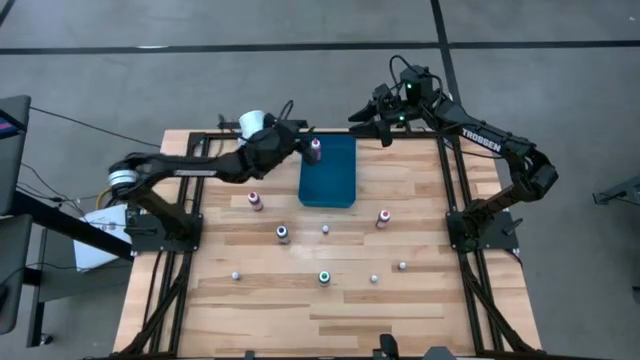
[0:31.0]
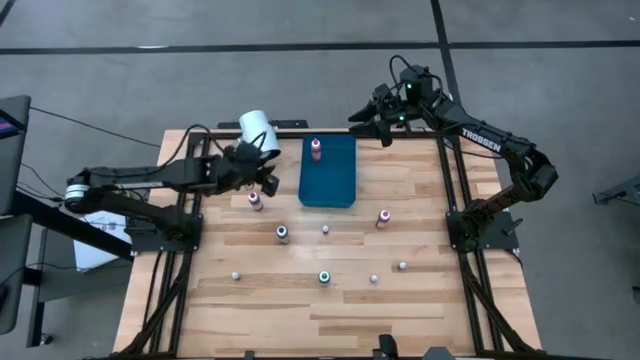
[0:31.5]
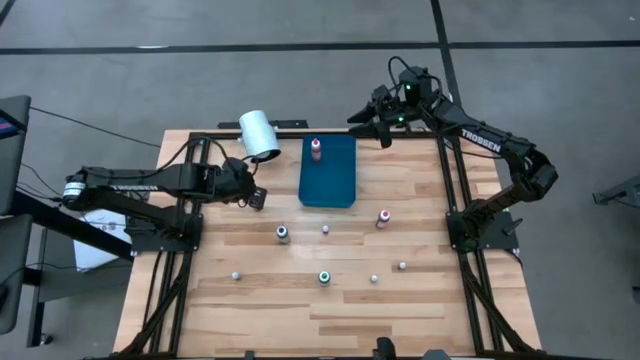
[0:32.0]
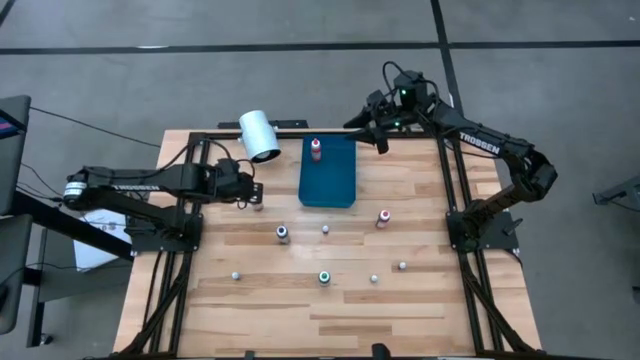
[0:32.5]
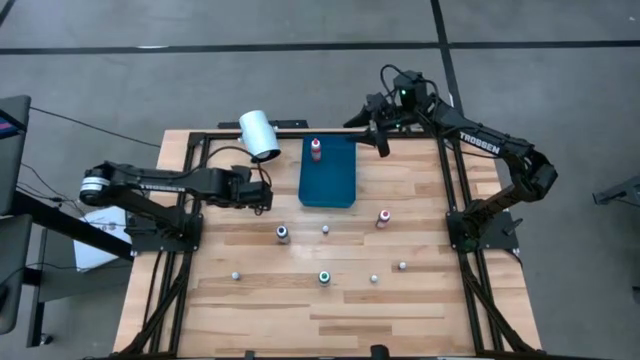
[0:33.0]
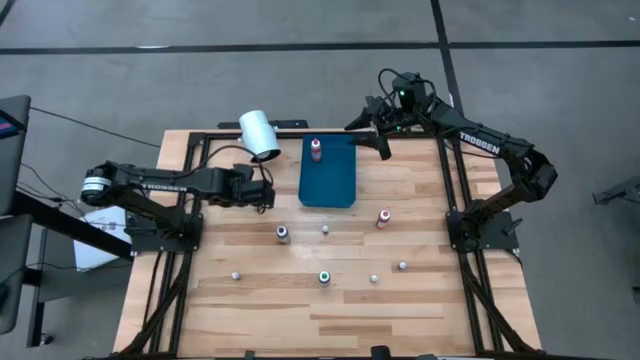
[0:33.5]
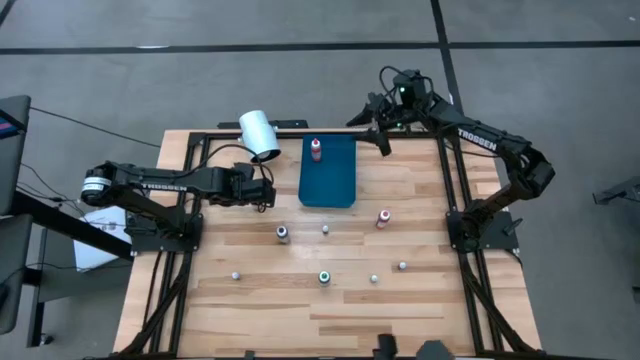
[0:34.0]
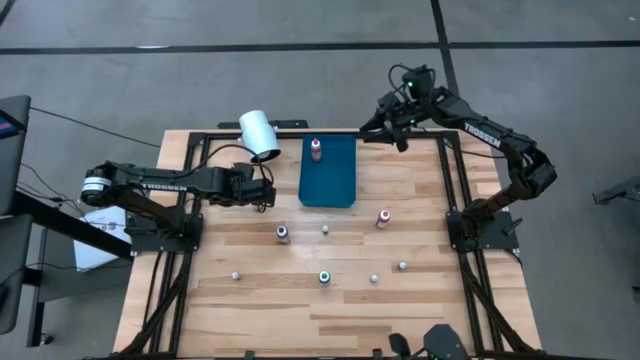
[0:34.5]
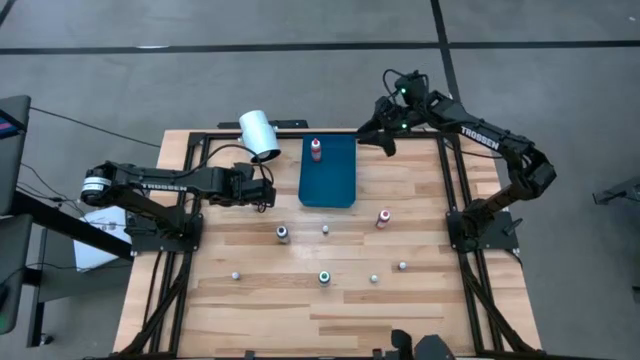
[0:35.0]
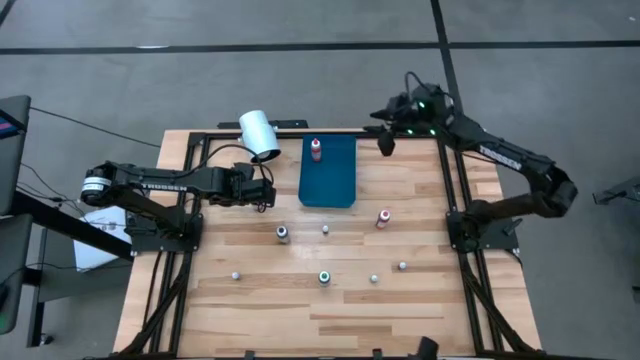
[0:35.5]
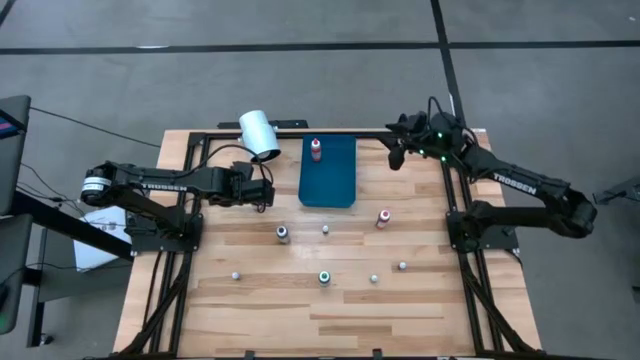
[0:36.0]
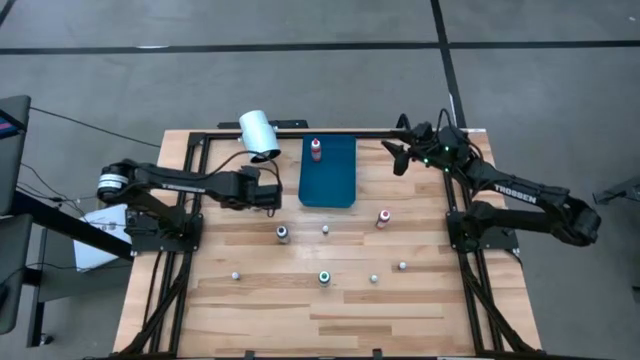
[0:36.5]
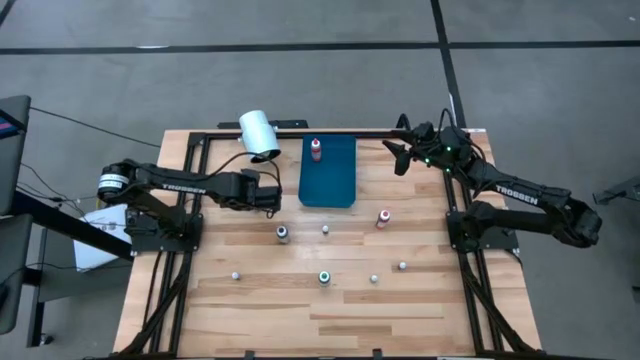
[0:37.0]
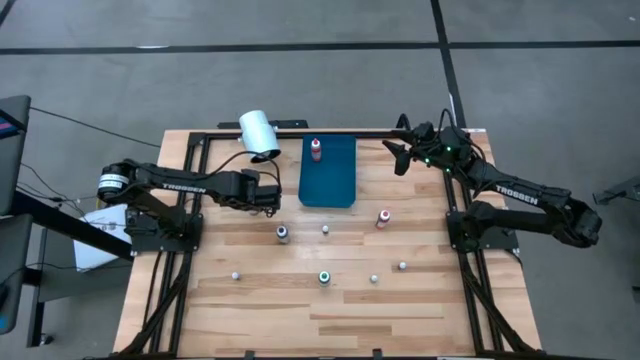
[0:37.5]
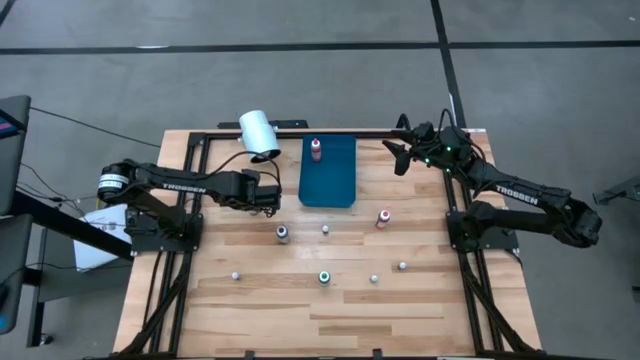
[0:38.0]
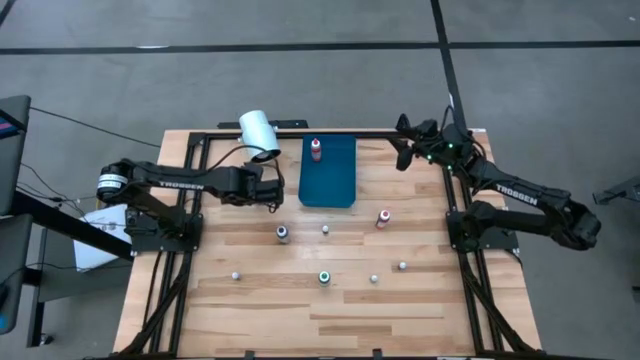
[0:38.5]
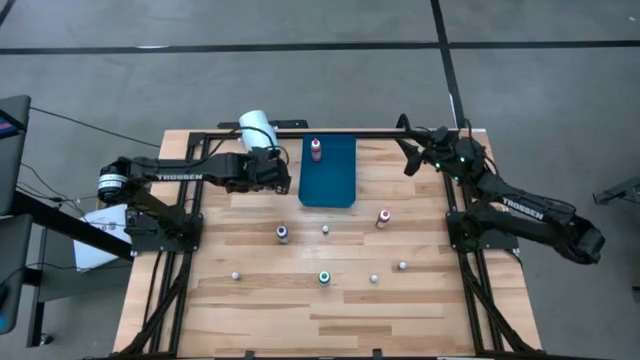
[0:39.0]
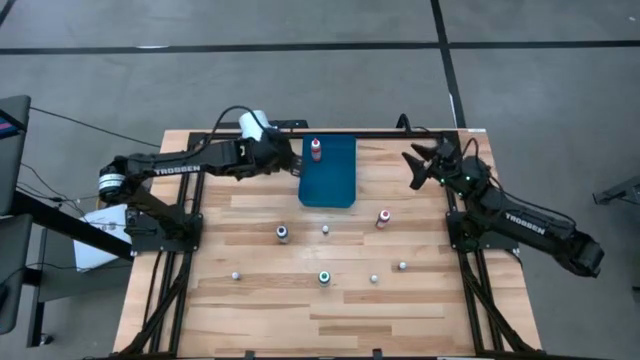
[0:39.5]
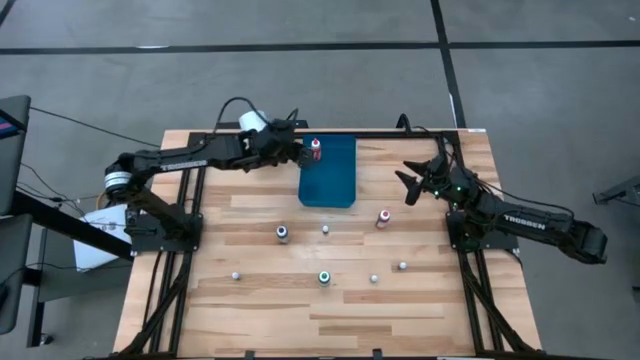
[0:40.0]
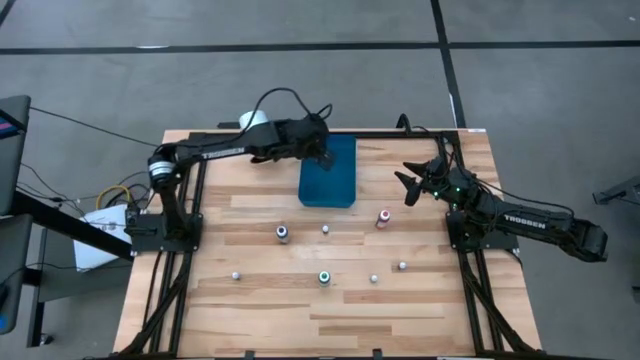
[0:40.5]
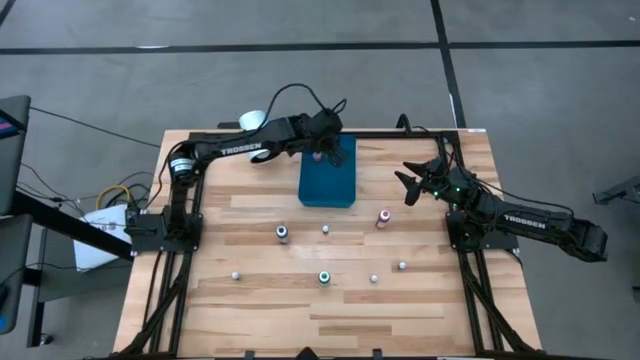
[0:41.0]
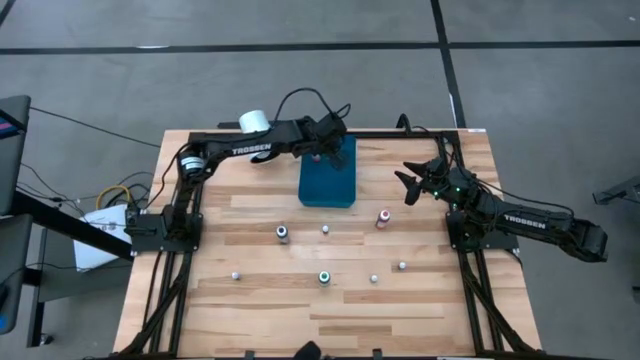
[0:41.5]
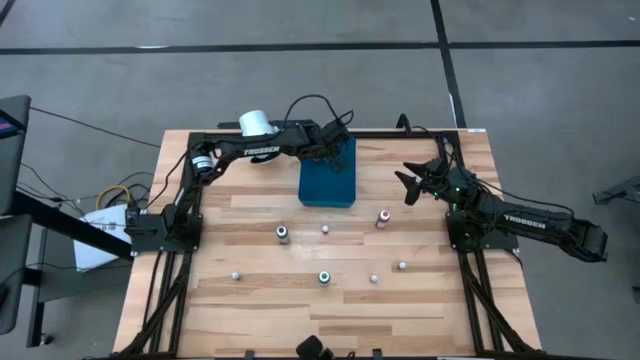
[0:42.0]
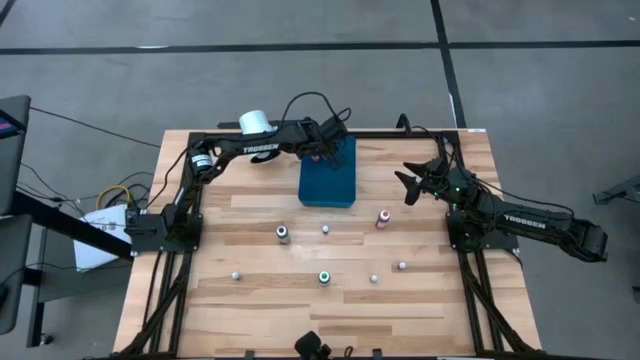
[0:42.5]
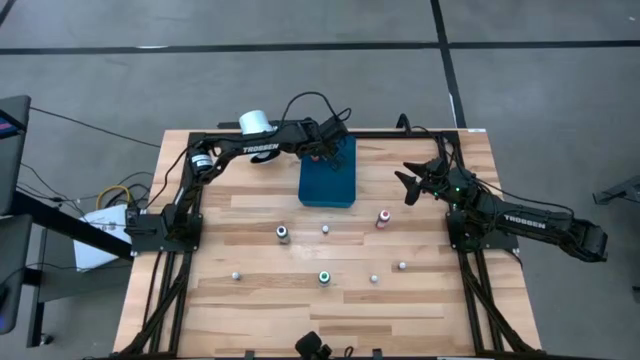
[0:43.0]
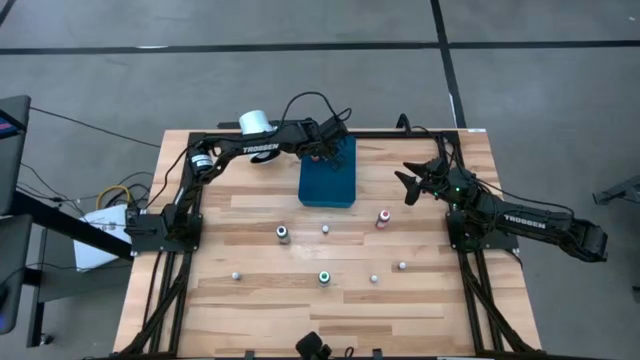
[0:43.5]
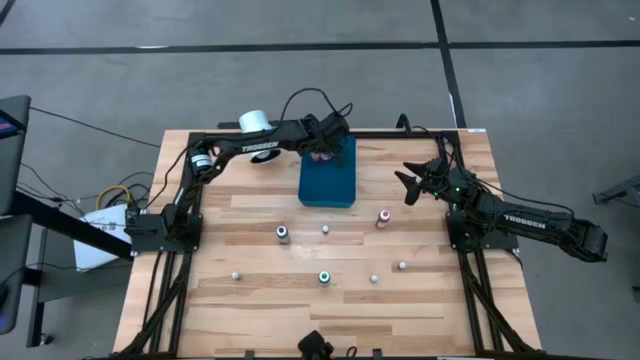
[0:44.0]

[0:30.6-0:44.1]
Task: Pick & Place food coloring
Put the big red food coloring bottle into the blue bin

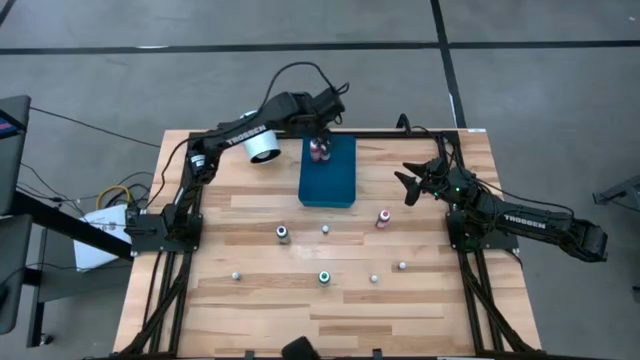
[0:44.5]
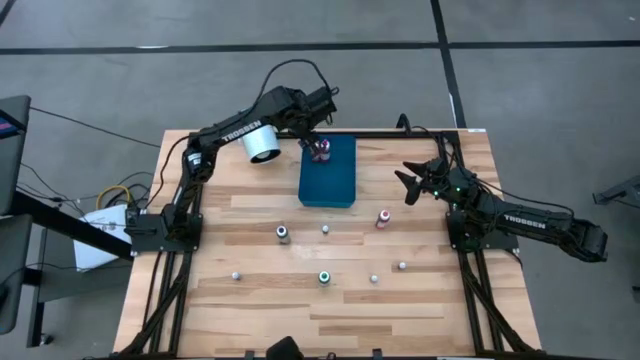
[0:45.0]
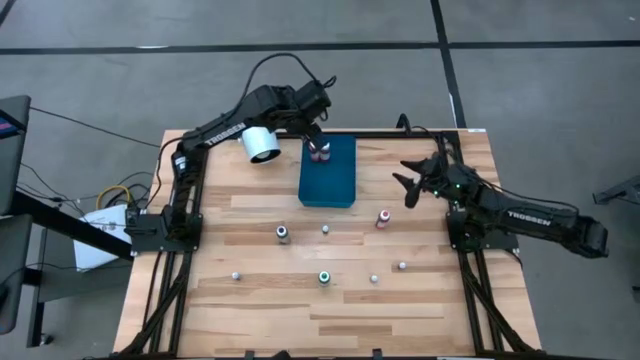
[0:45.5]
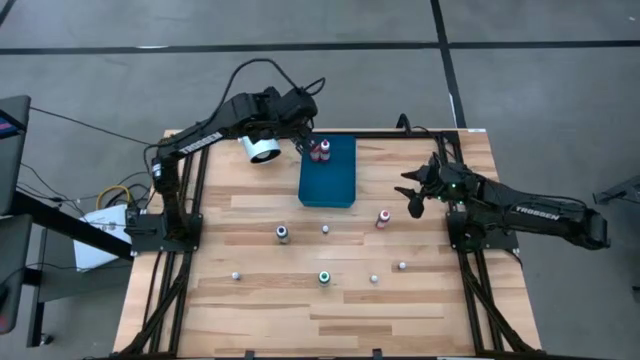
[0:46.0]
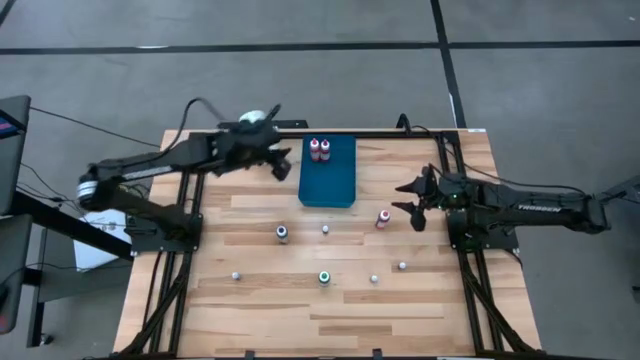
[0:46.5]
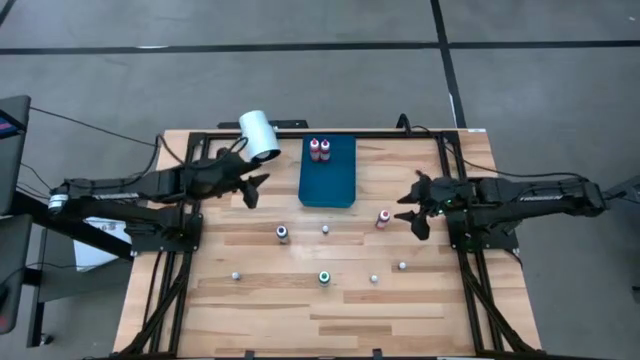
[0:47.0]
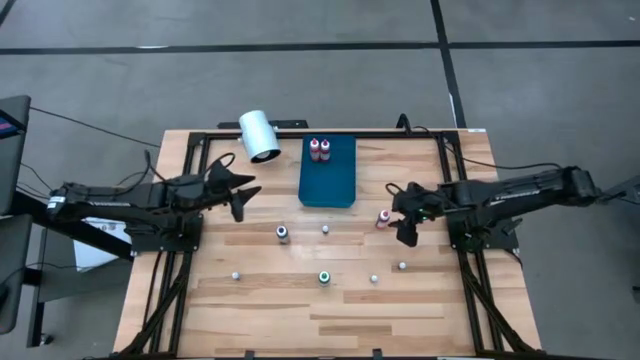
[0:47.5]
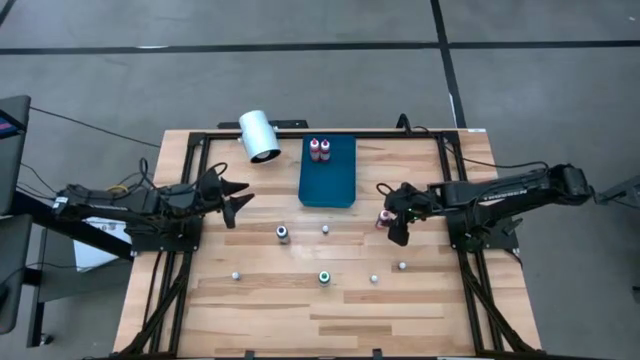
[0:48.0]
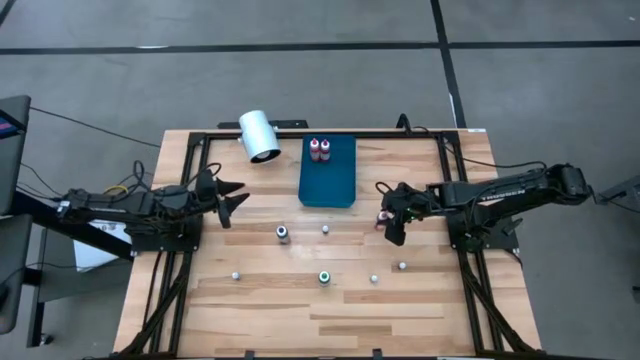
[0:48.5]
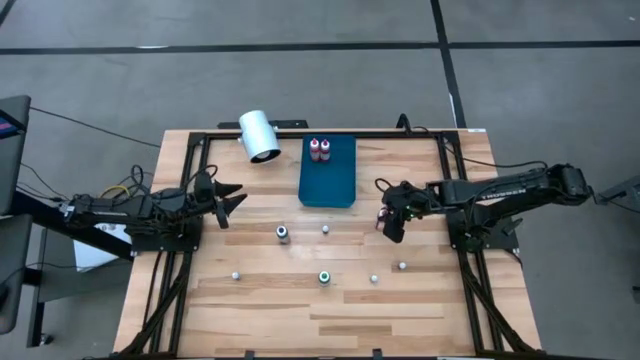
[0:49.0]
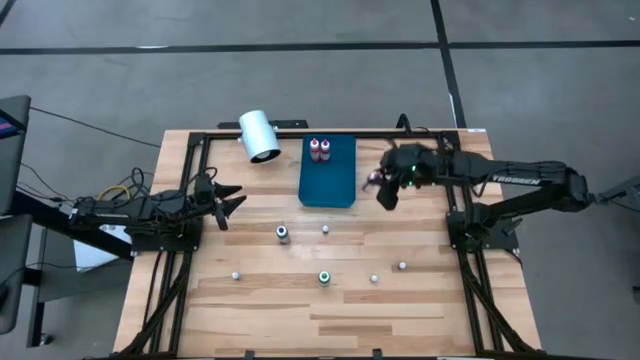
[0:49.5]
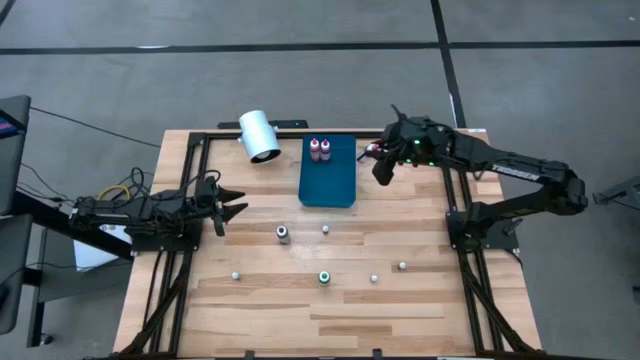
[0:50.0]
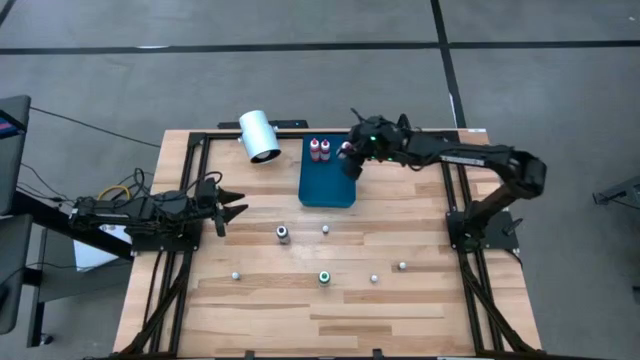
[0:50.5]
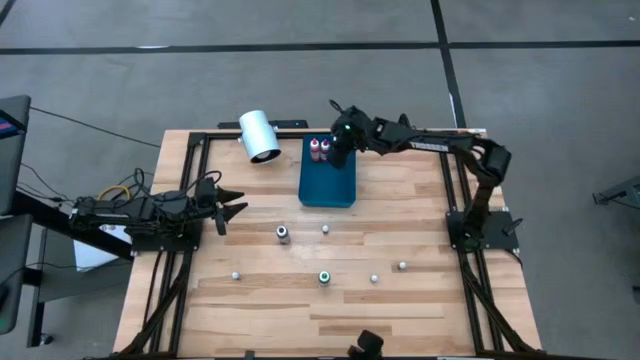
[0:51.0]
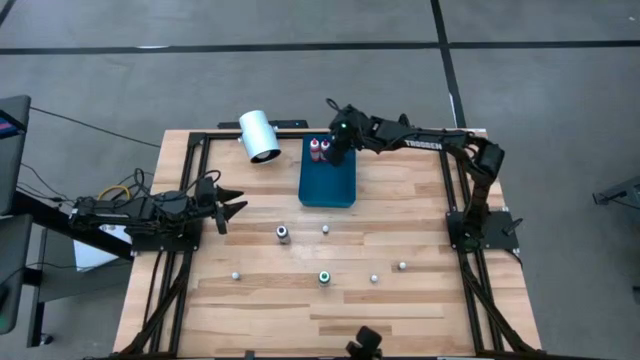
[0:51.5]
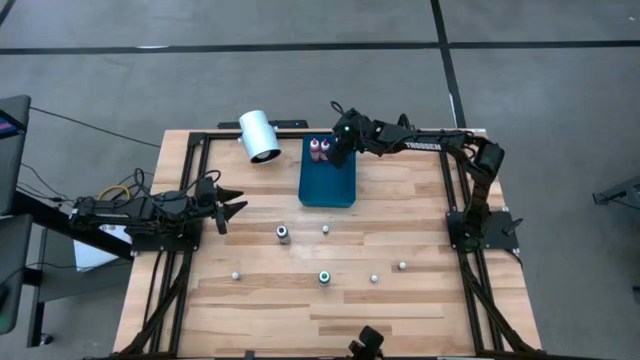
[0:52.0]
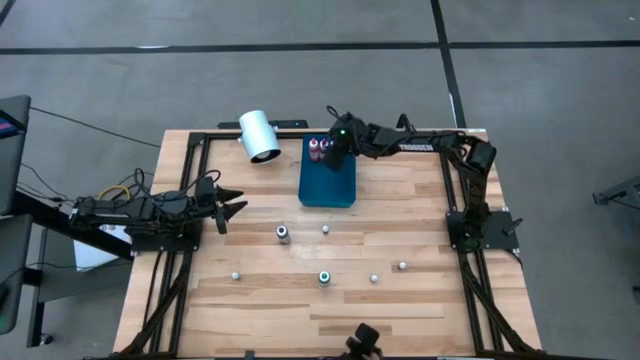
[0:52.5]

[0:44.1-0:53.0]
Put the big pink food coloring bottle into the blue bin
